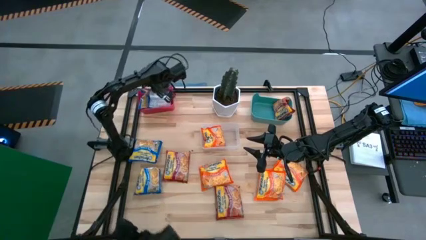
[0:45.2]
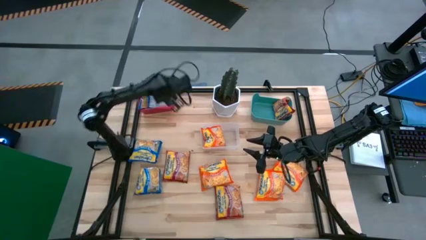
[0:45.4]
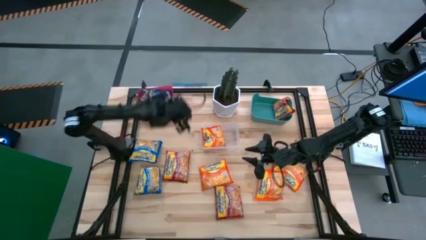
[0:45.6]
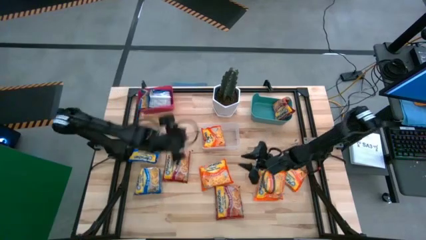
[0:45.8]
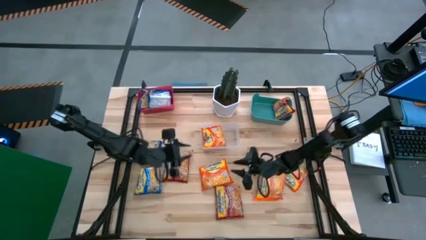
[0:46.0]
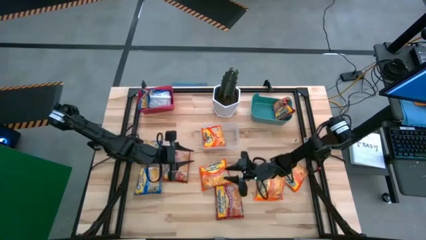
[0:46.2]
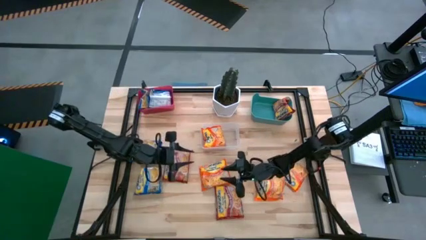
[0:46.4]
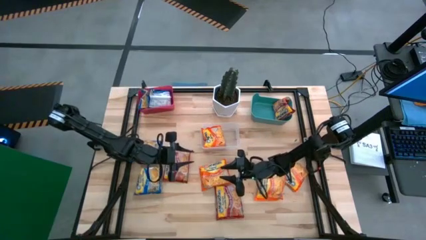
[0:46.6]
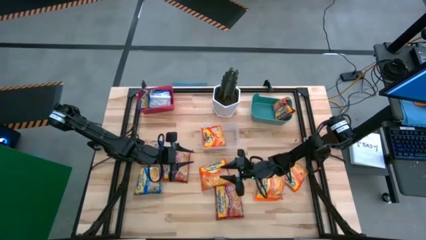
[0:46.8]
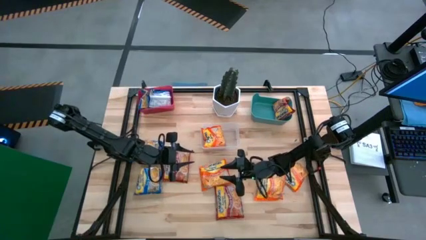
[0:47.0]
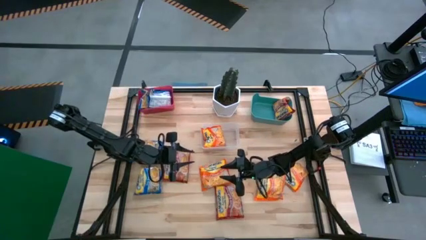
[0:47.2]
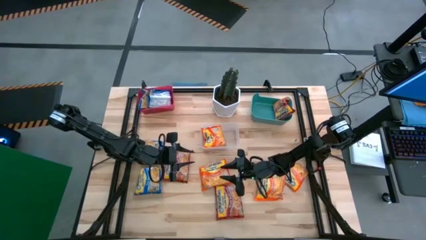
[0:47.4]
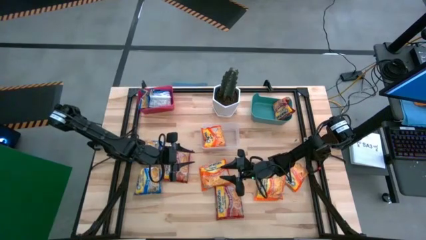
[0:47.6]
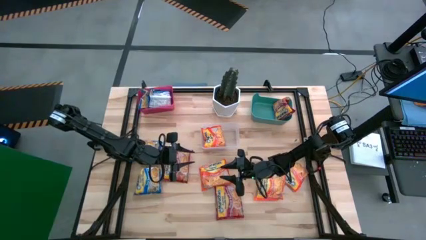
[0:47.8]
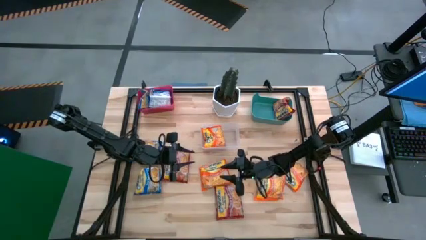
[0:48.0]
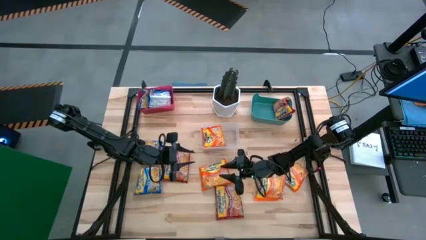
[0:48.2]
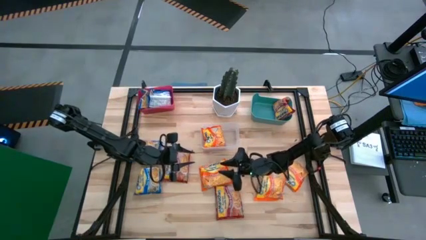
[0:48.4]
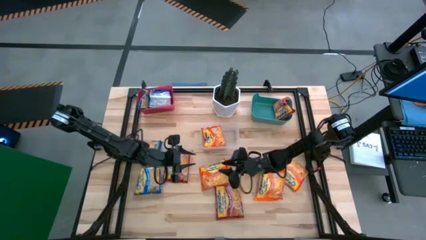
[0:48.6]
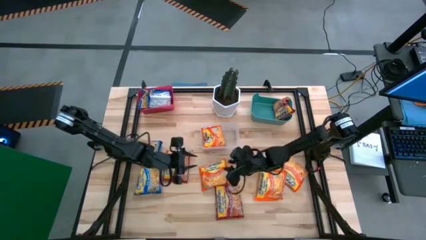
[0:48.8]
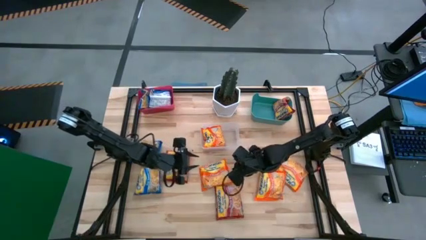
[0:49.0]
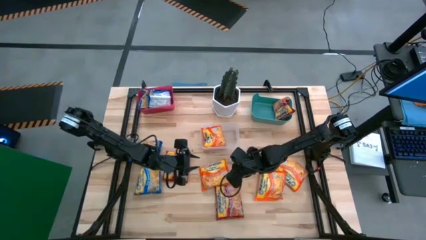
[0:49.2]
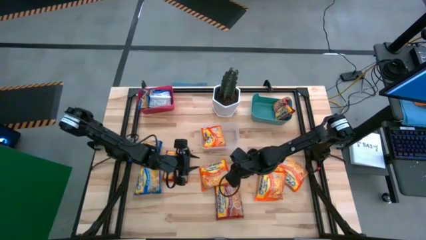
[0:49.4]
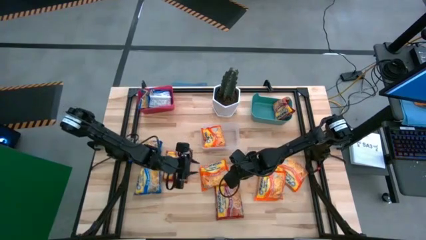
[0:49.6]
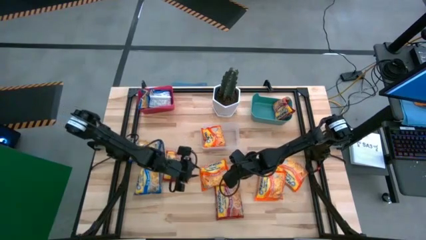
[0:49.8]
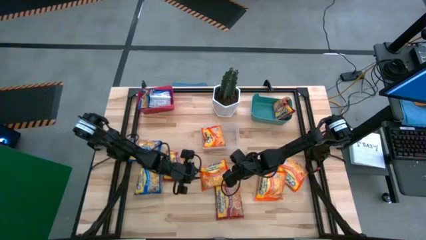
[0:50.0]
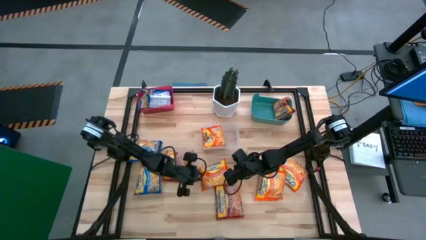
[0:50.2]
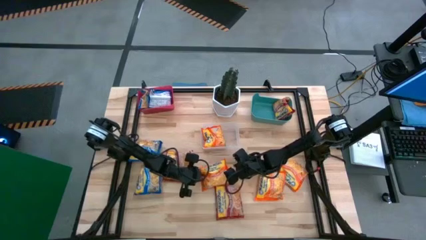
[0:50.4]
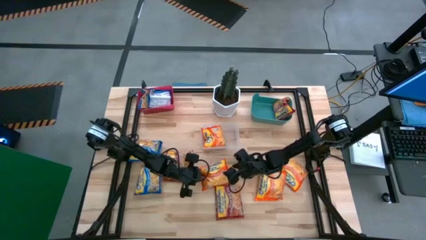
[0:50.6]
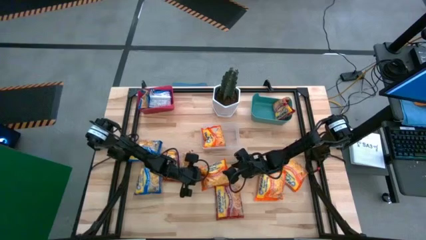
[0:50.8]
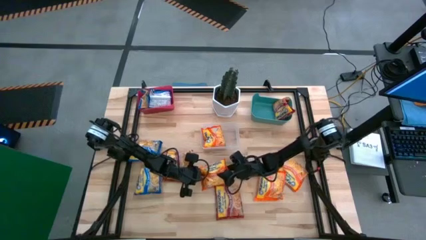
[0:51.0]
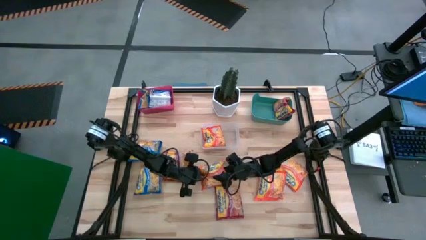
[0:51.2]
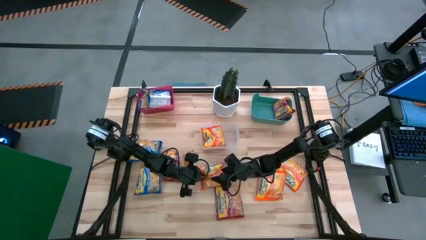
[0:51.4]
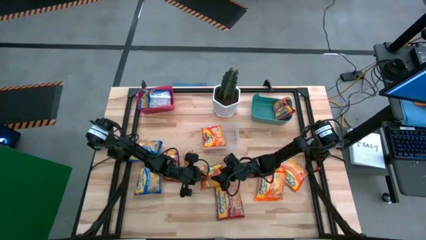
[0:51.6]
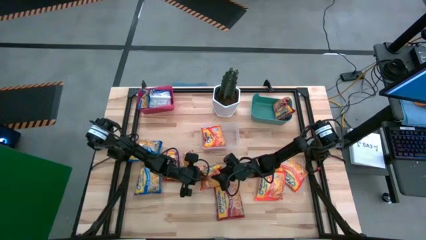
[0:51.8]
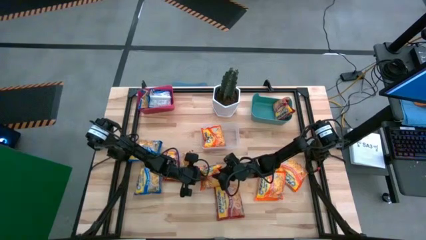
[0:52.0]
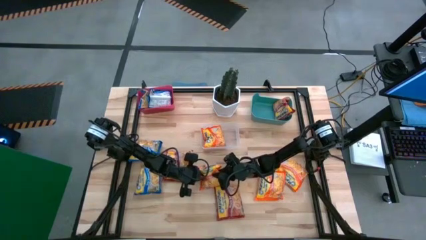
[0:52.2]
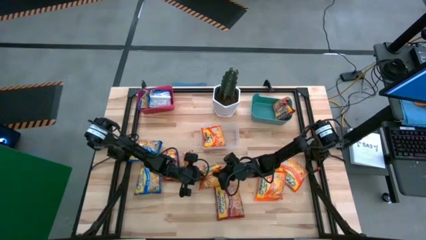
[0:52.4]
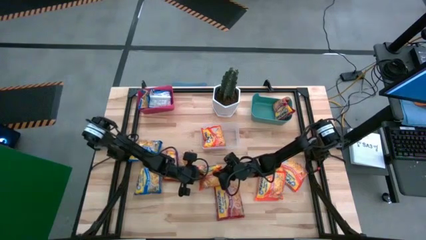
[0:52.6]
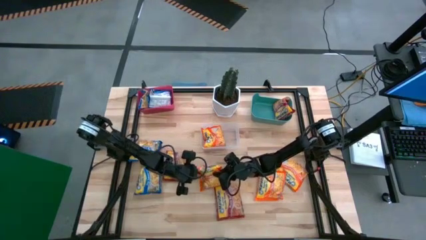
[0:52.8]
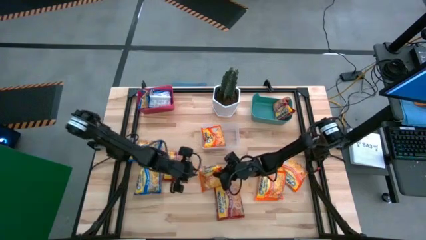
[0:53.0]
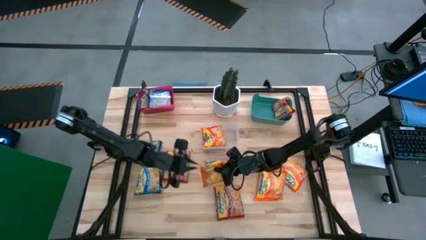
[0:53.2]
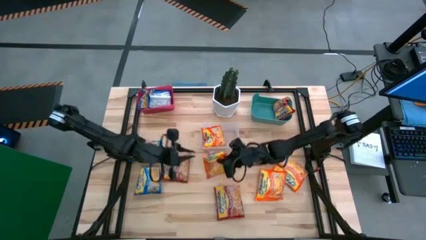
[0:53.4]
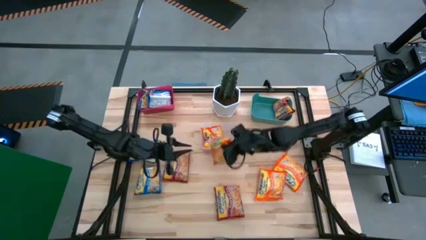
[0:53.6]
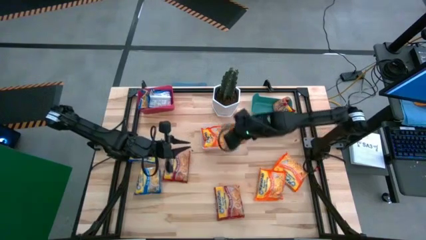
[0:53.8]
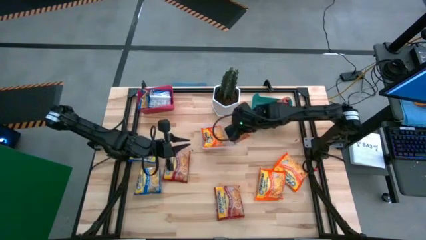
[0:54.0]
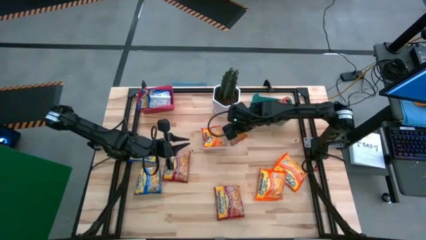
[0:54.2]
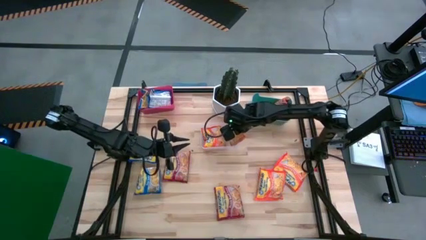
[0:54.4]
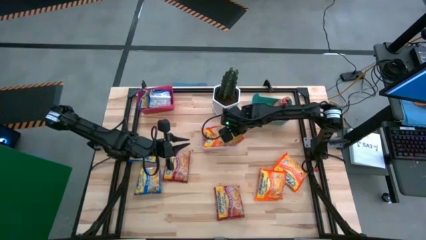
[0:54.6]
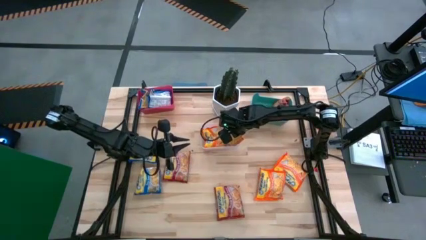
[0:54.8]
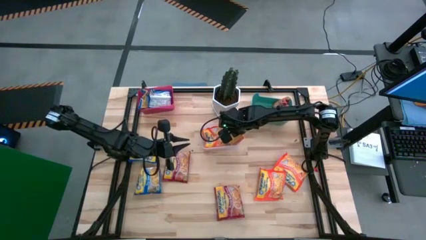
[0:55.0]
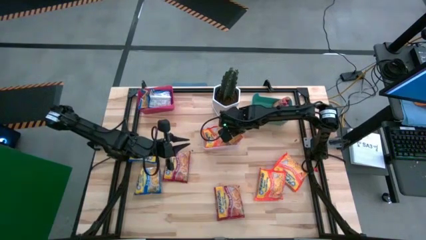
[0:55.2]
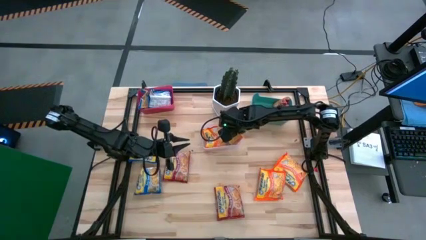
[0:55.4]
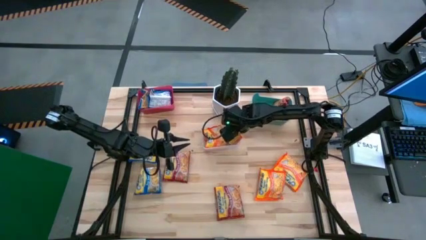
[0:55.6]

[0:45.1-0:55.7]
Task: Sort Maruchan noodles
Put the orange noodle pack into the transparent bin

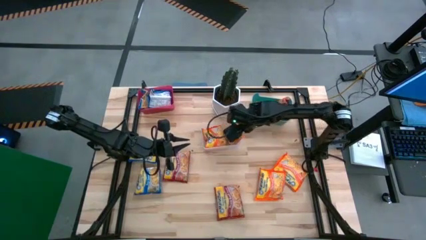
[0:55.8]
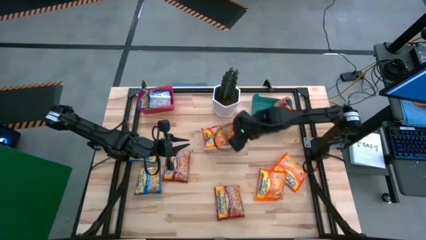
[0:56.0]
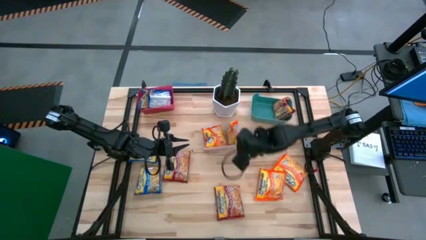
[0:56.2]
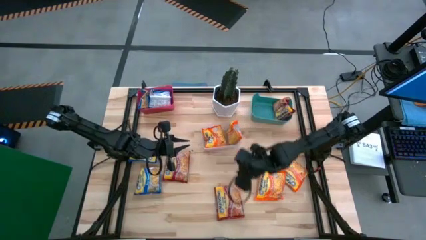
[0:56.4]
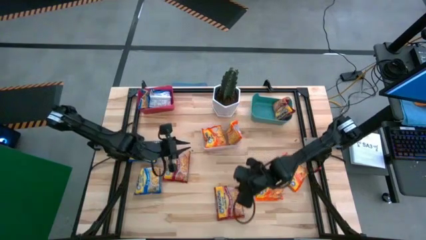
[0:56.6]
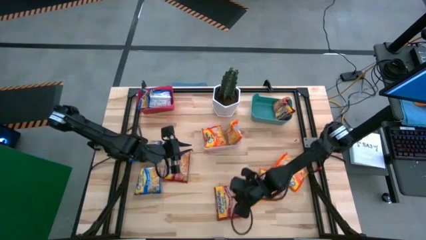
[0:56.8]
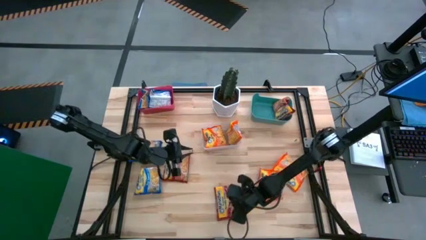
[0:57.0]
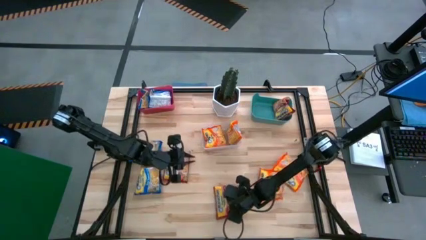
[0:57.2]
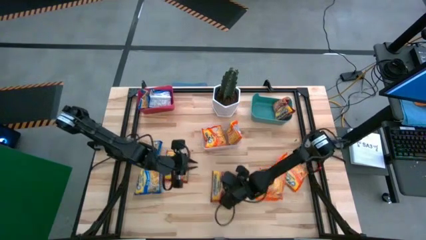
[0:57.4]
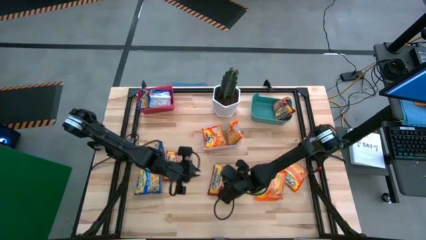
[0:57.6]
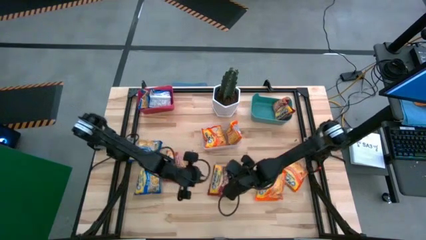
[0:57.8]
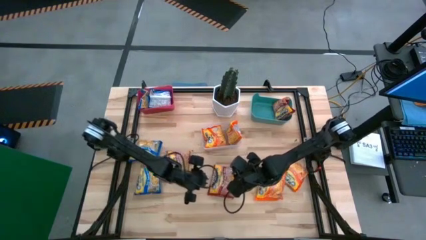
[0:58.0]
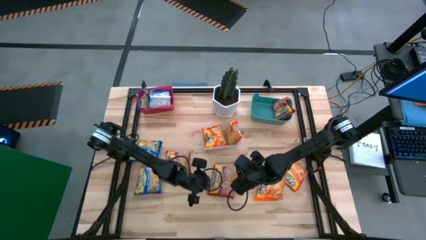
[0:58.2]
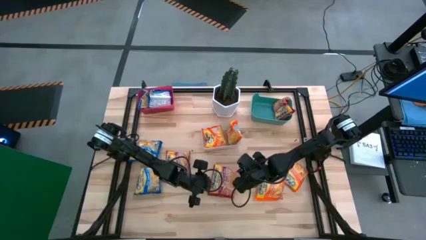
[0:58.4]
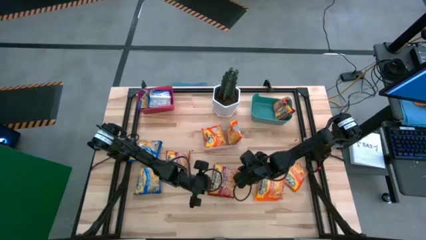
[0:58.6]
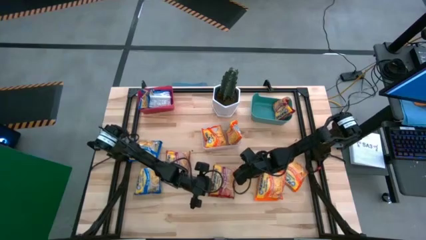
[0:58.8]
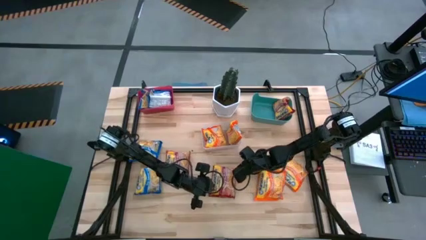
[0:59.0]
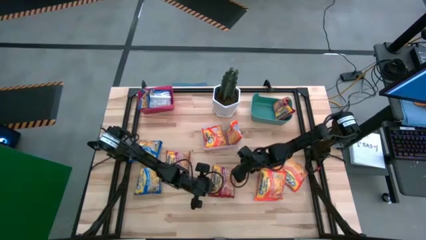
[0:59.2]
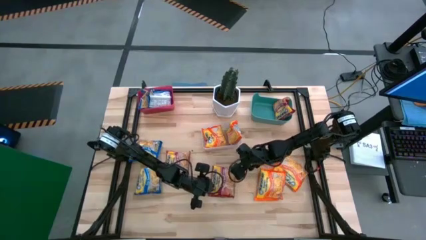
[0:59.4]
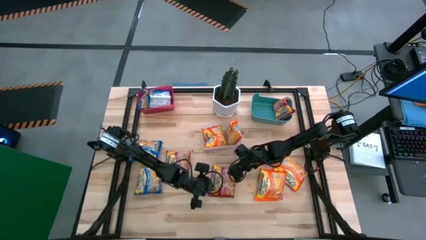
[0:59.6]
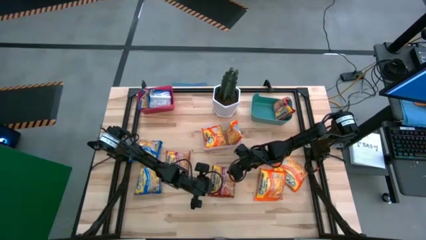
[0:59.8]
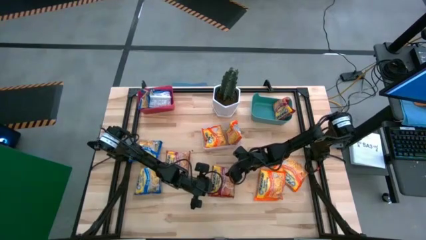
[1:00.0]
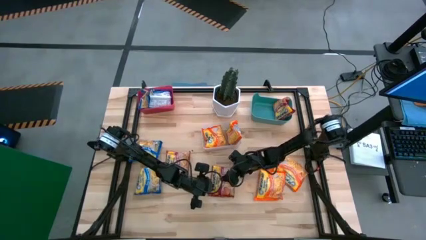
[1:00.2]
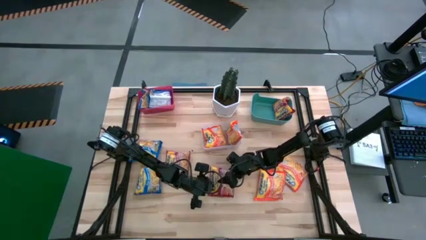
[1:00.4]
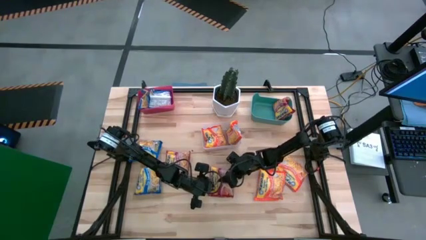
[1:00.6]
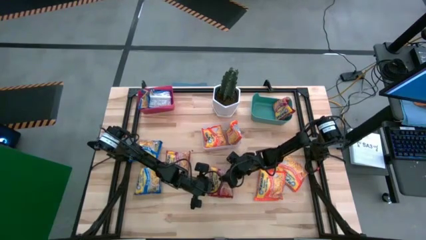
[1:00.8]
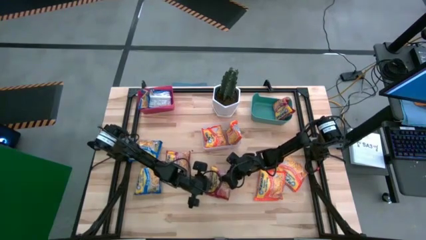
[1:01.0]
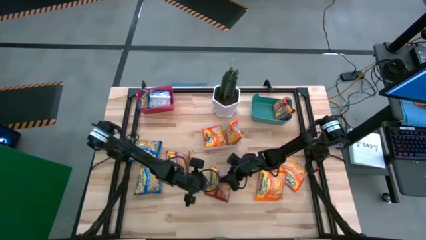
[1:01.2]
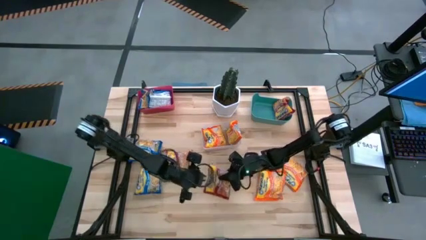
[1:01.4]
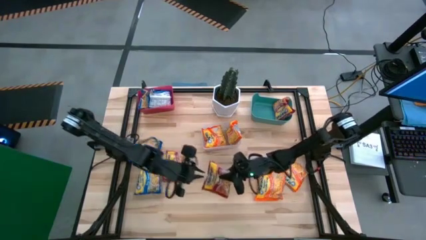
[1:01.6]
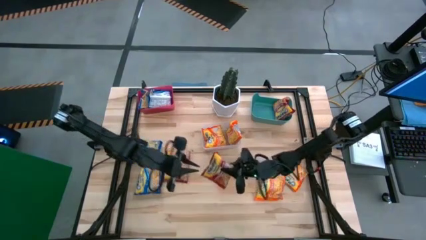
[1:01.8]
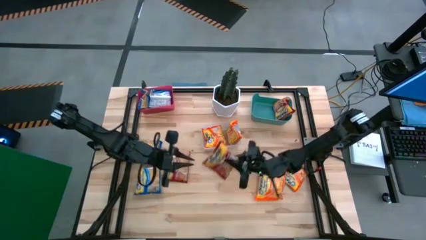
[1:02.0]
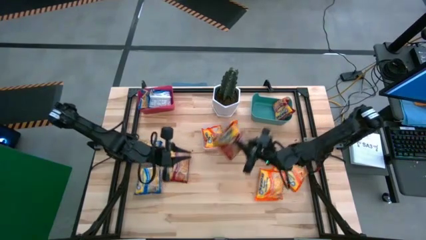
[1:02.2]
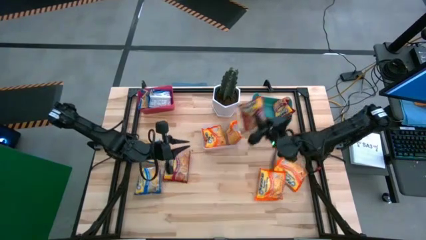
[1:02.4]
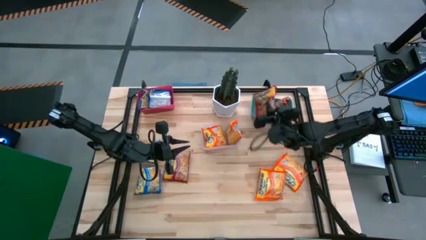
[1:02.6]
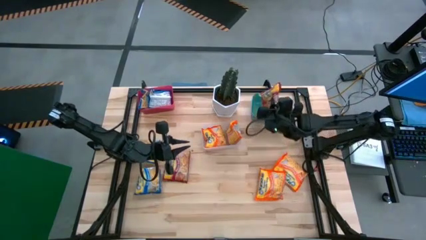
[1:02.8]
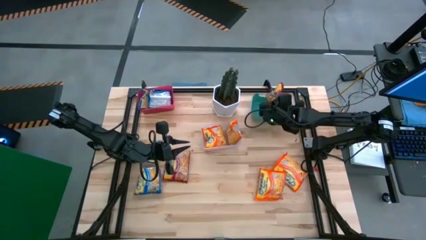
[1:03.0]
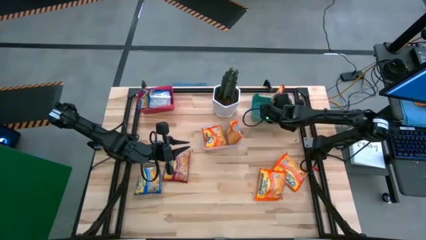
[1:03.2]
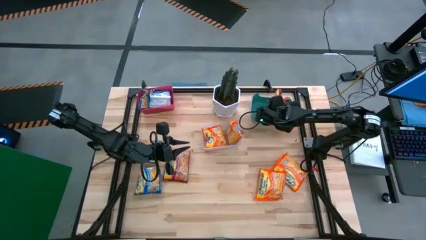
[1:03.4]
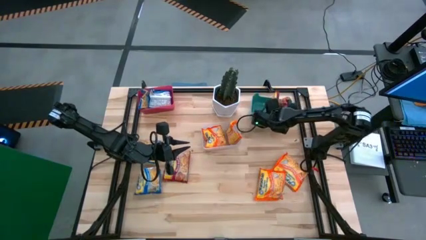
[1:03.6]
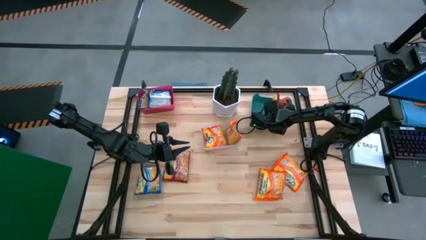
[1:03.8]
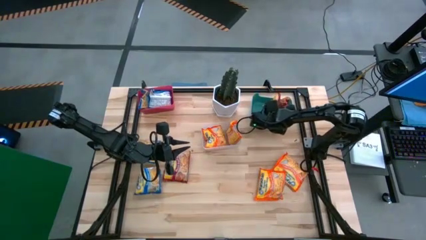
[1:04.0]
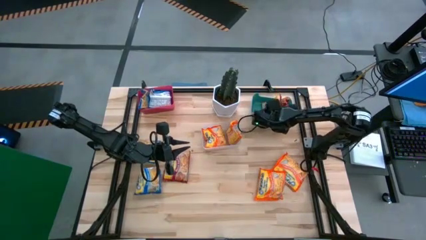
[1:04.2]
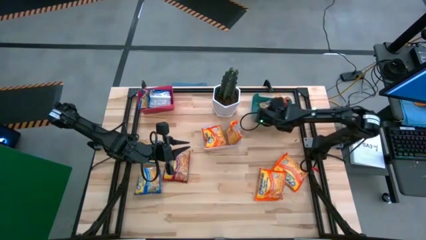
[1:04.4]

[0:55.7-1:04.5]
Put the red noodle pack into the green bin
